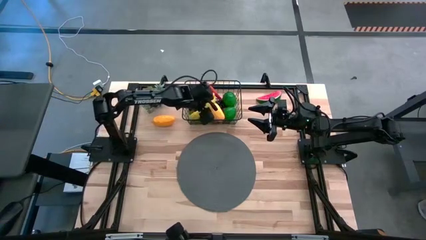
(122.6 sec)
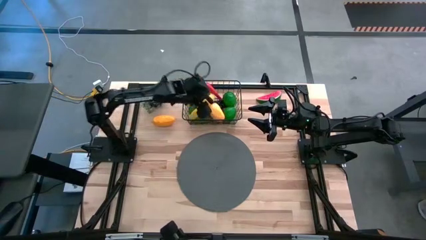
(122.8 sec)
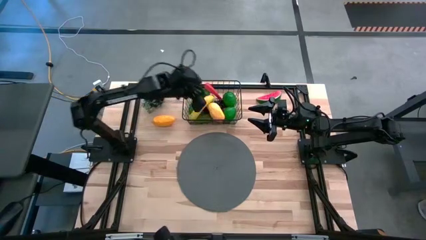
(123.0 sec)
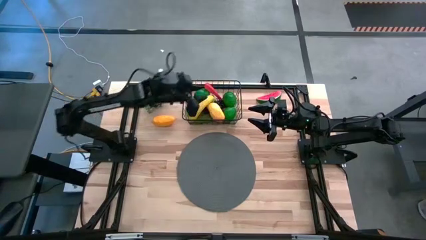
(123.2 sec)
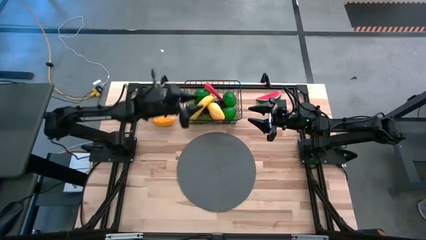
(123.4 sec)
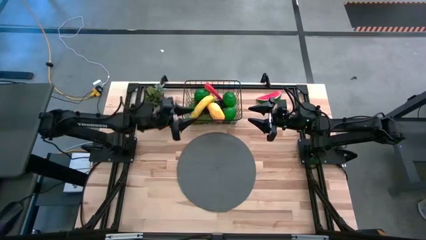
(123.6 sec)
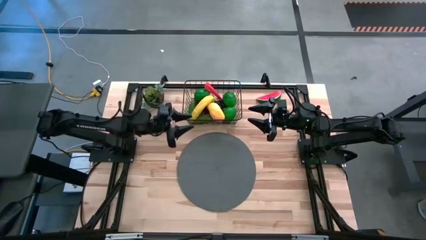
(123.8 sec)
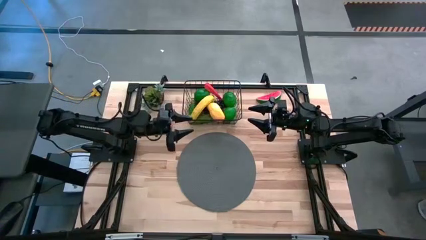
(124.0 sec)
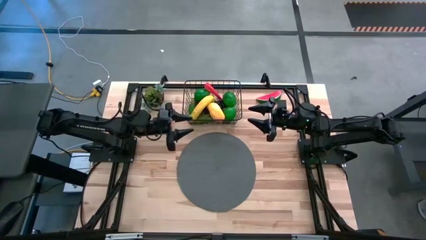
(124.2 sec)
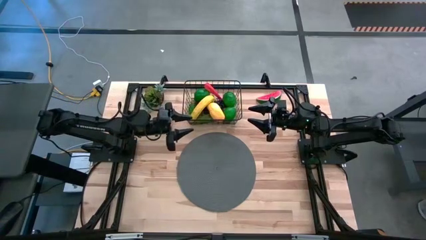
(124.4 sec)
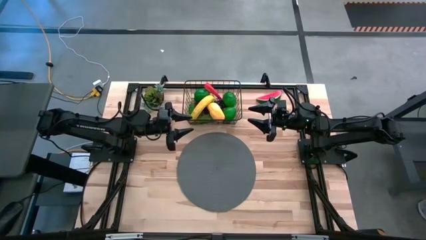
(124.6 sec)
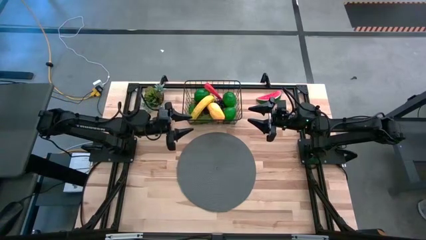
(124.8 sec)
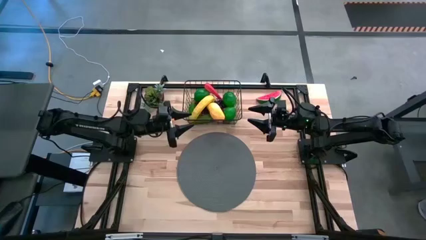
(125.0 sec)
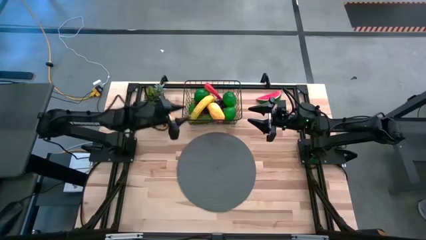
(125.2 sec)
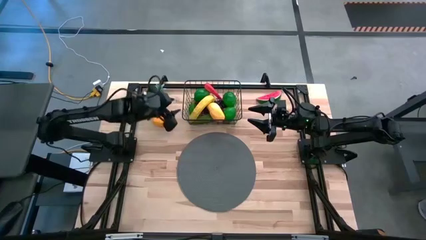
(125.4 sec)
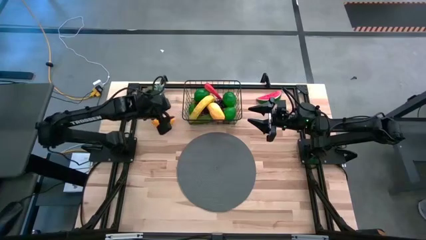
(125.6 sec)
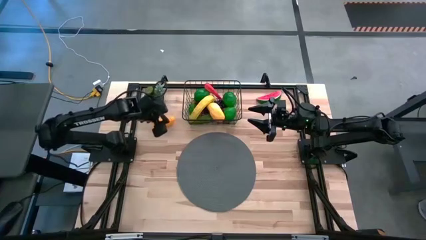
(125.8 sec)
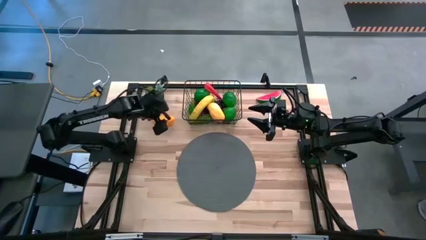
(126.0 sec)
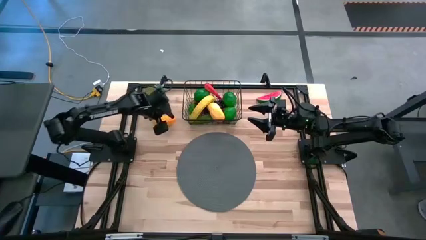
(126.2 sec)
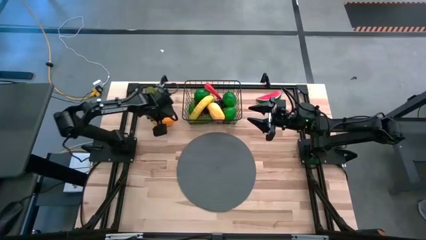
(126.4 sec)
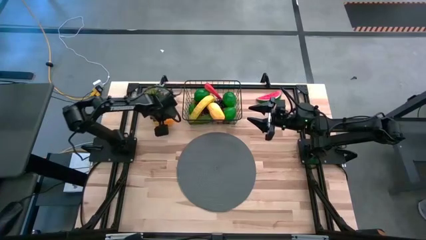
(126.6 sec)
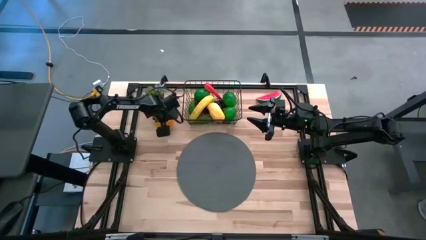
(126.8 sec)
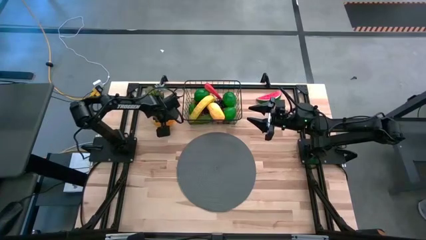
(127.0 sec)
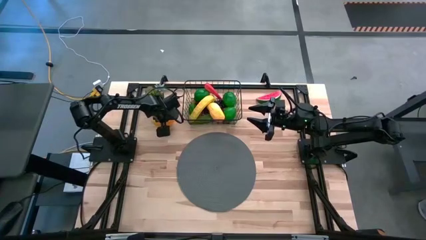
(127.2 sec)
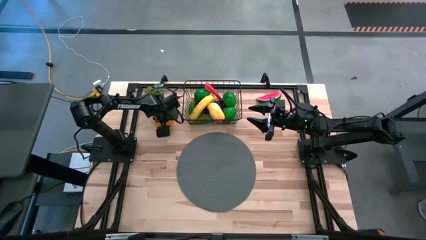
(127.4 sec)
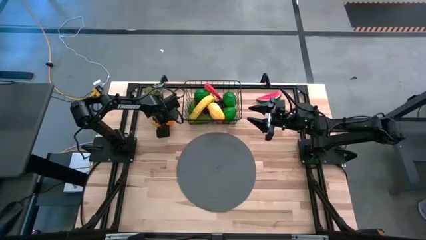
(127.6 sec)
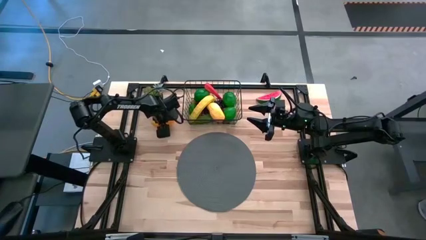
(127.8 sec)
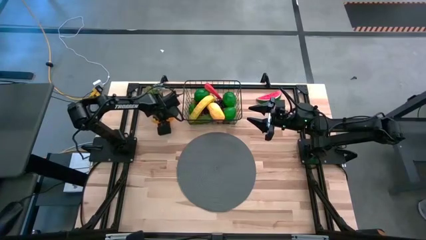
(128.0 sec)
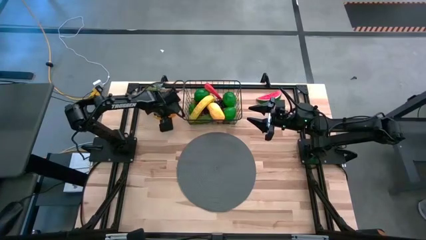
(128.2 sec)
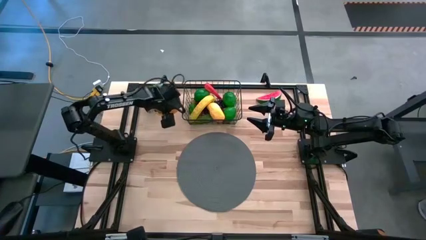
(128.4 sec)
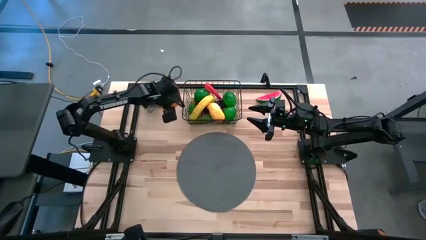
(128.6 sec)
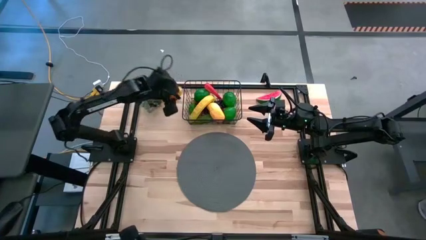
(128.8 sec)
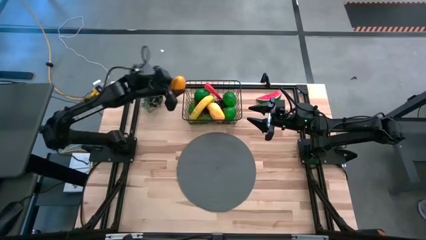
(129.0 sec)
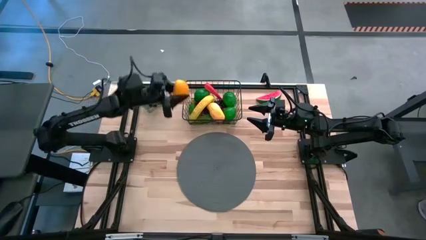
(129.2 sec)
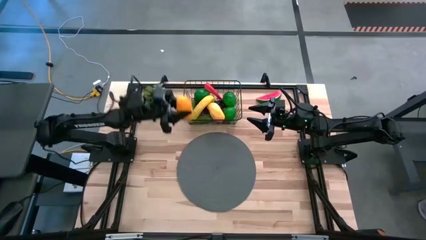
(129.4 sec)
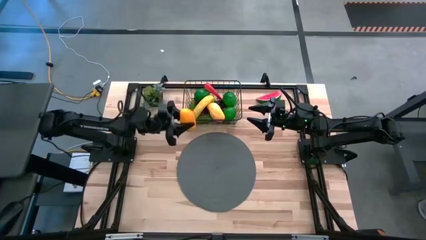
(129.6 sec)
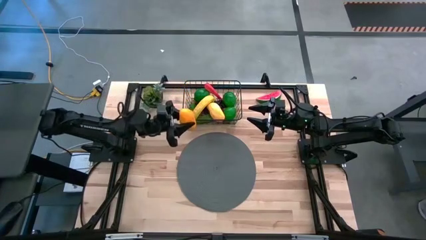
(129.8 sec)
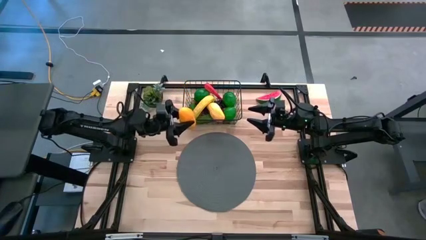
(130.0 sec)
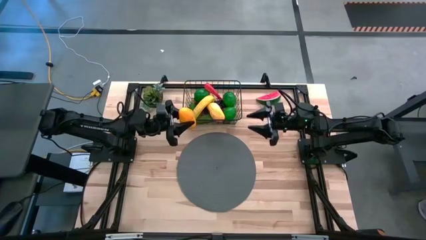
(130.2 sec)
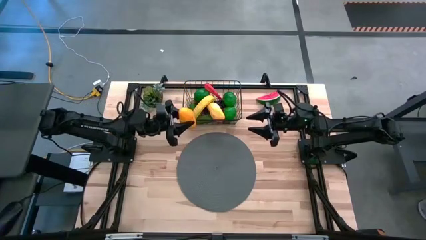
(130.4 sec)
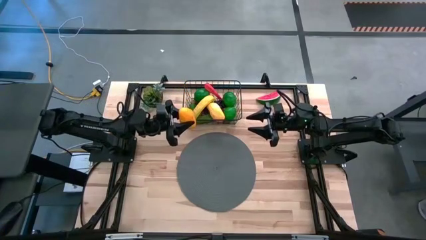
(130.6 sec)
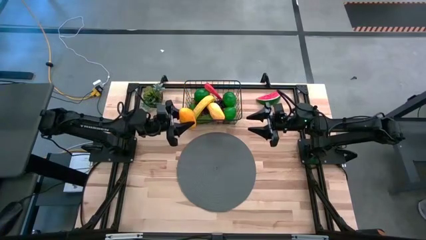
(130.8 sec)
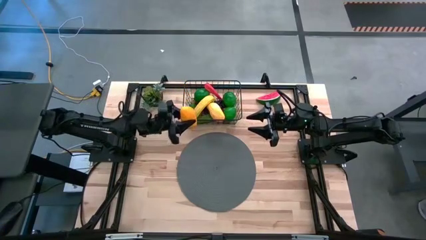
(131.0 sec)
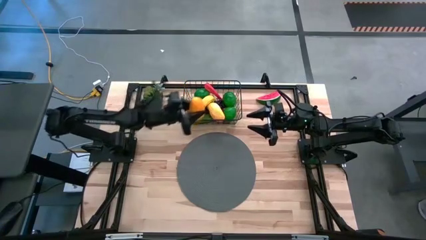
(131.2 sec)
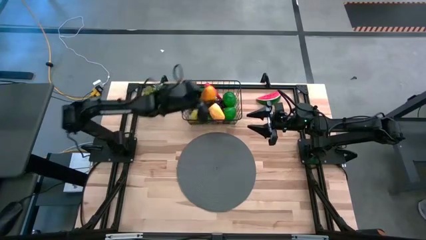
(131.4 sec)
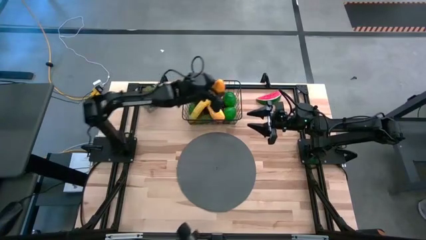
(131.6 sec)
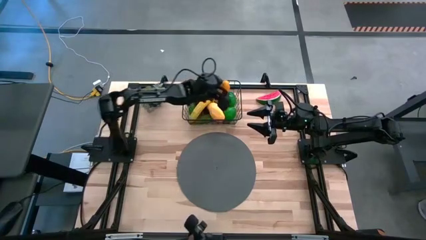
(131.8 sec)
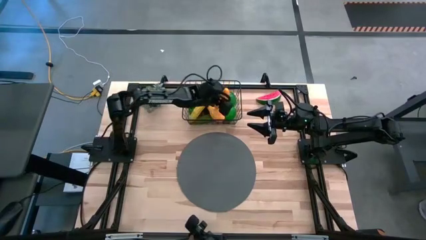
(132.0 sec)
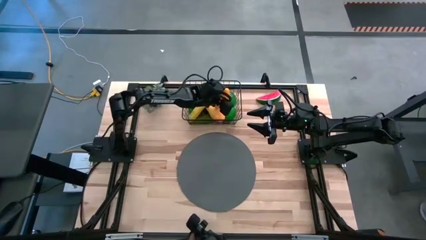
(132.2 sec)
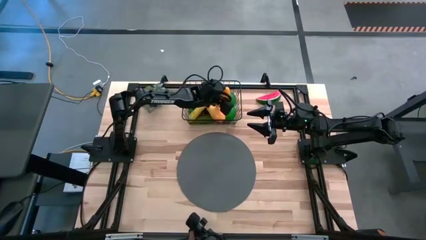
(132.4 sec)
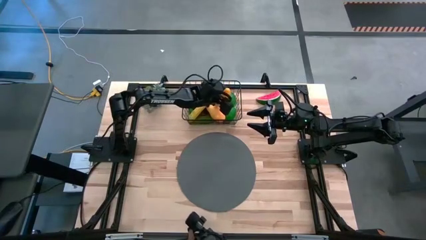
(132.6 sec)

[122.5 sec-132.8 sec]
Task: Build produce basket
Put the yellow mango into the black wire basket

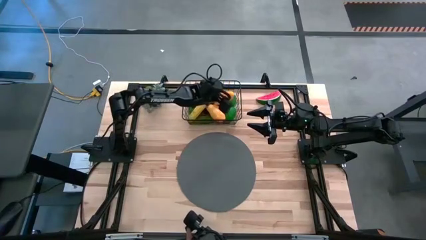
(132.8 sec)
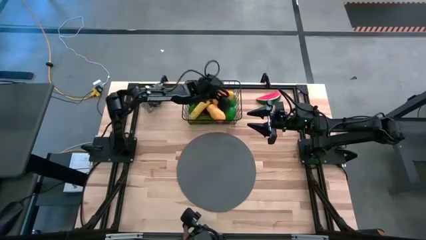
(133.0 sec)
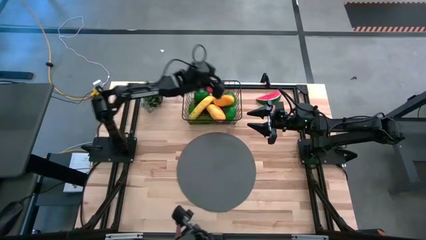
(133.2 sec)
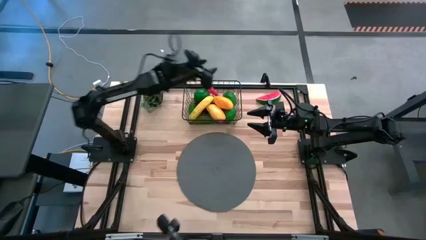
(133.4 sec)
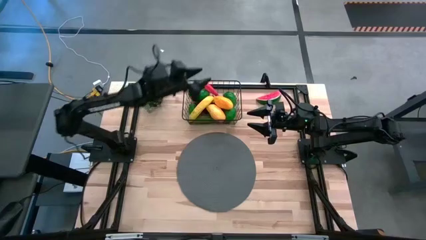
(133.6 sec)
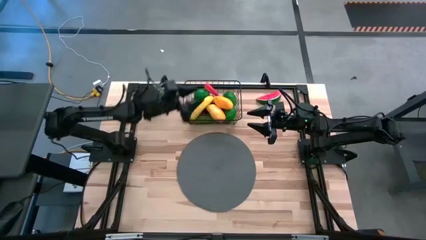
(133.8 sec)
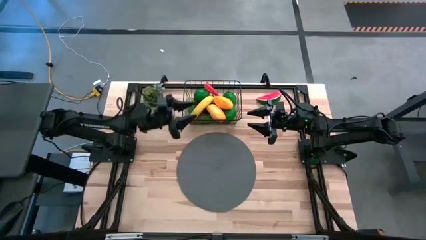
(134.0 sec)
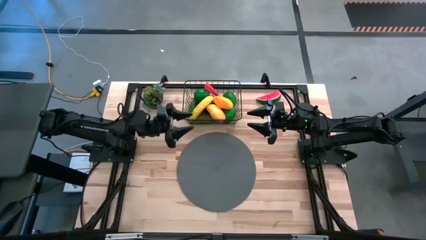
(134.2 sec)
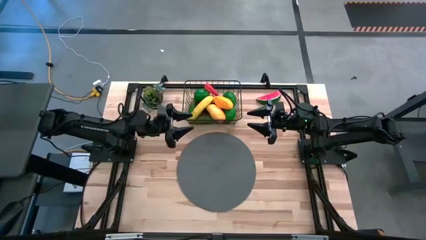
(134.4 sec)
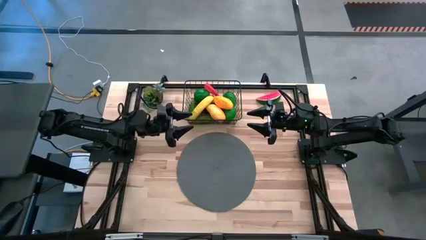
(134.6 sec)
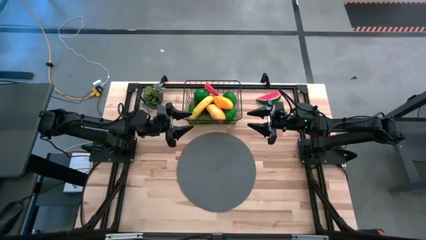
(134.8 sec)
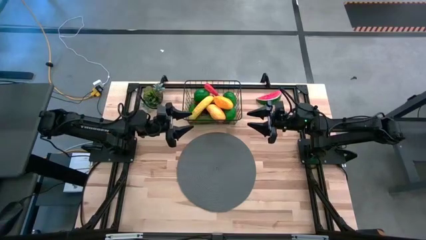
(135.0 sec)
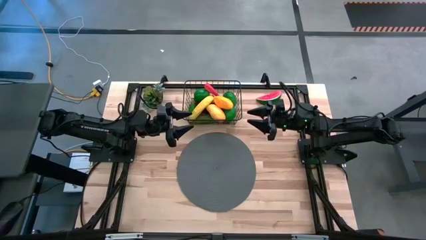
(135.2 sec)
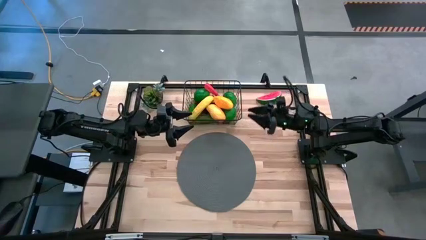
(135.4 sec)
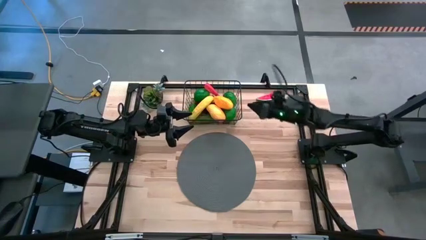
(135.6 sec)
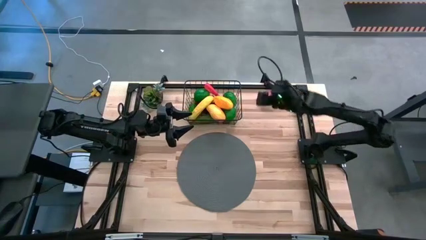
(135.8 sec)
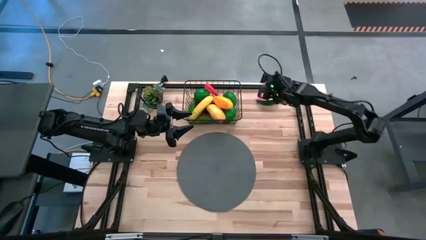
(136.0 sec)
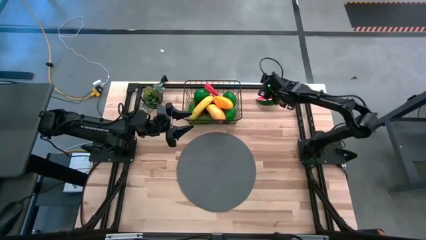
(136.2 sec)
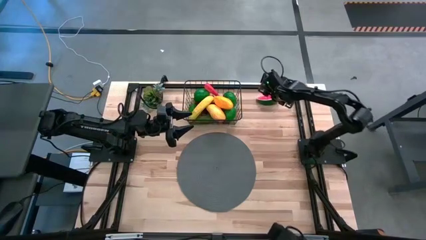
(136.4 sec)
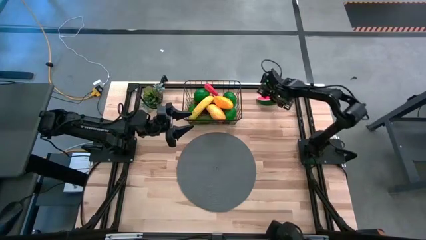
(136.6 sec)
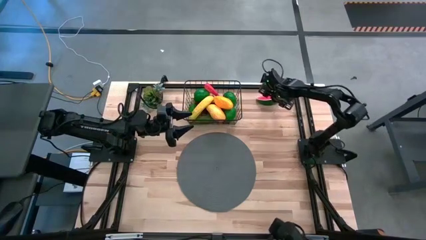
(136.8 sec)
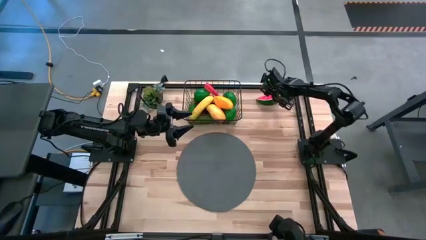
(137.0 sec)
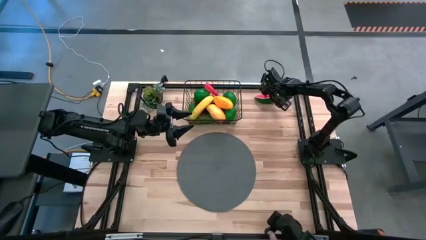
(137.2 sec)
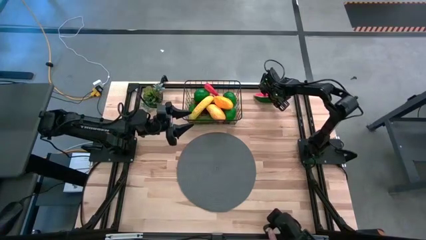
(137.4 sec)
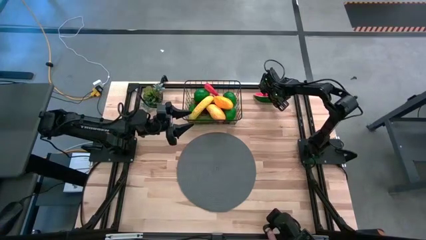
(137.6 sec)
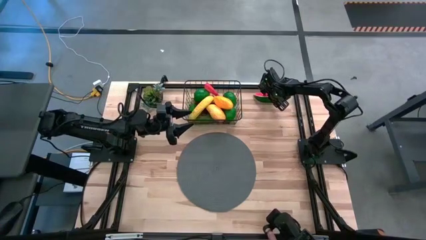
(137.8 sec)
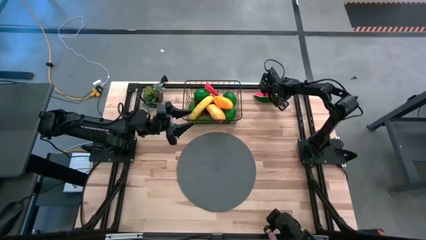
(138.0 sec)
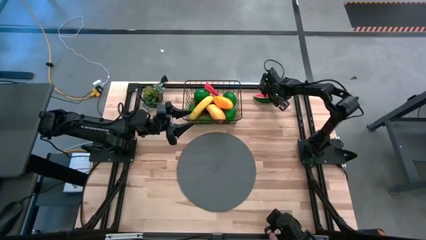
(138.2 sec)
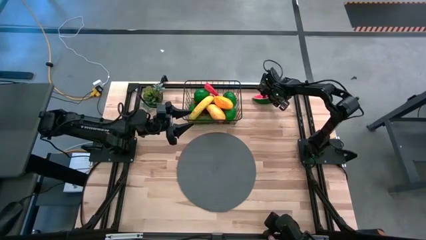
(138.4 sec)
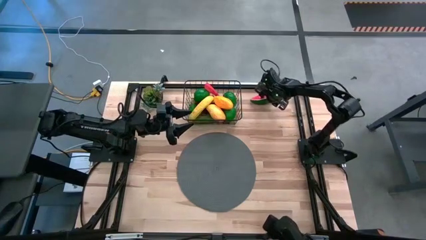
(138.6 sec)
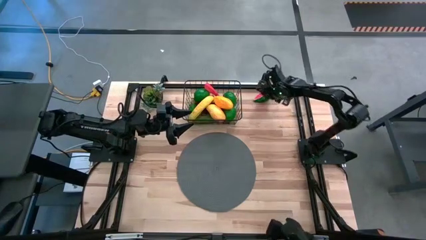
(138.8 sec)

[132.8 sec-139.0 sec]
Put the green watermelon into the black wire basket
